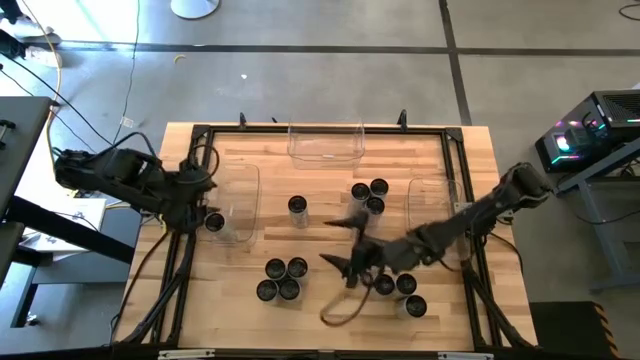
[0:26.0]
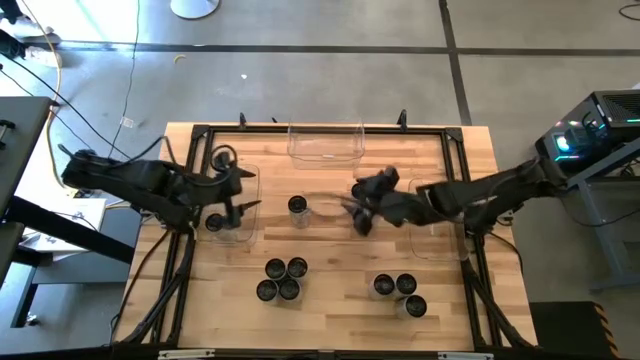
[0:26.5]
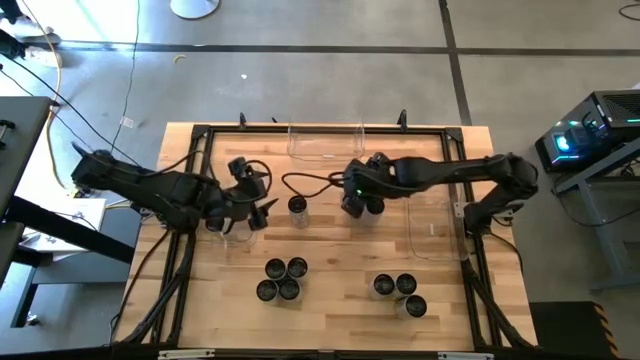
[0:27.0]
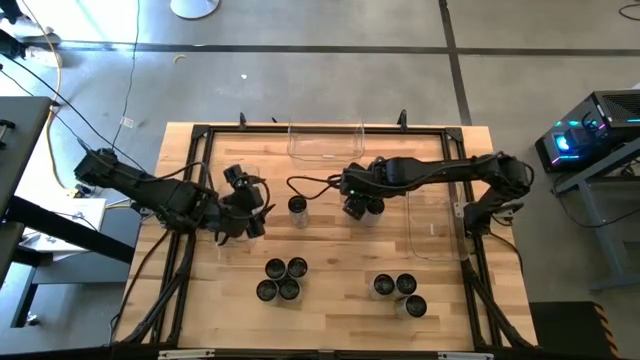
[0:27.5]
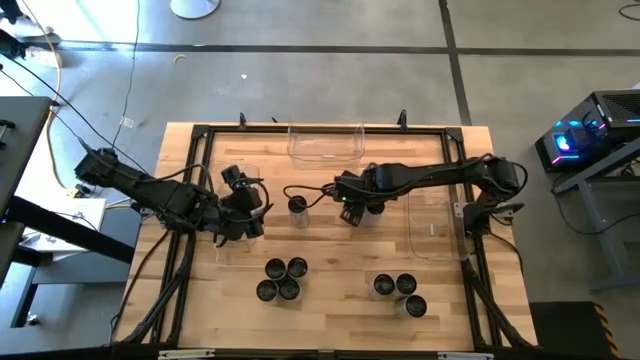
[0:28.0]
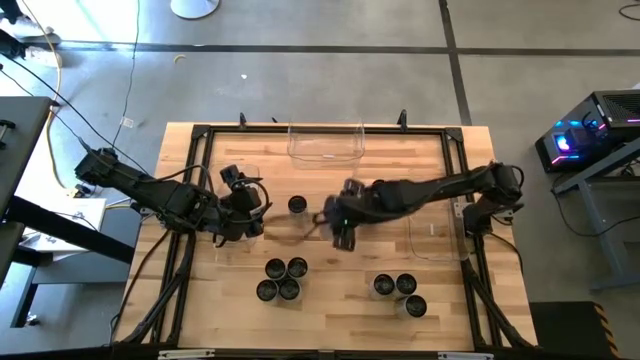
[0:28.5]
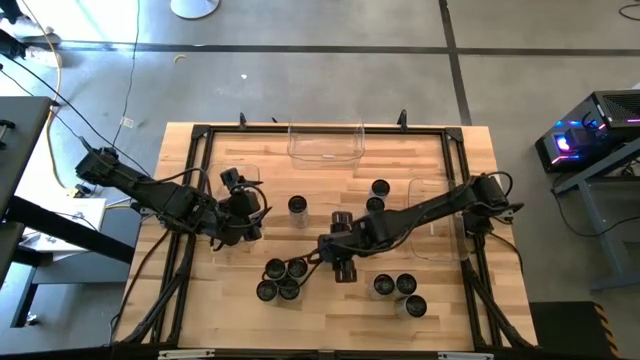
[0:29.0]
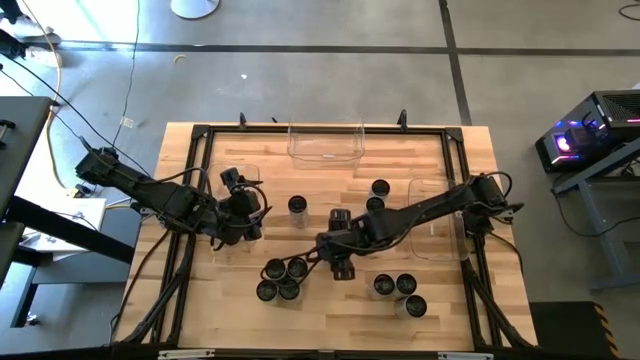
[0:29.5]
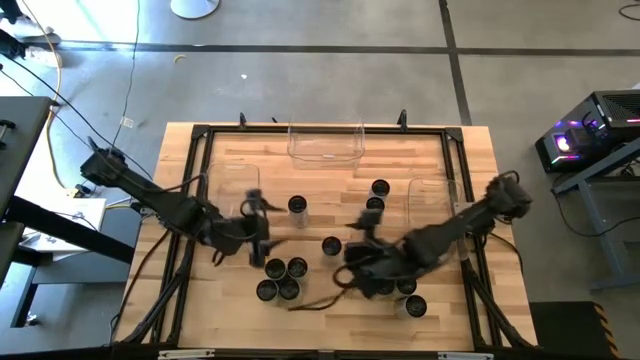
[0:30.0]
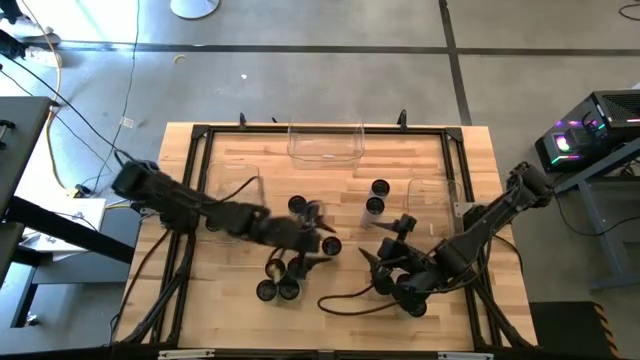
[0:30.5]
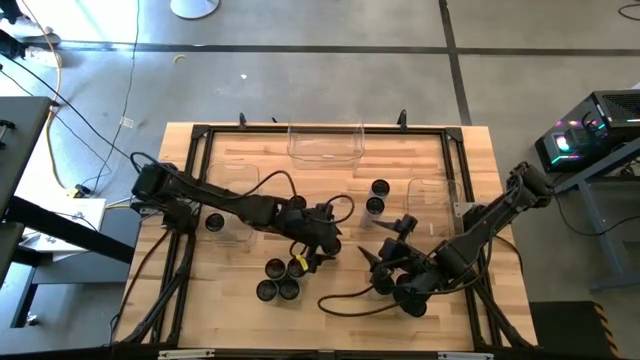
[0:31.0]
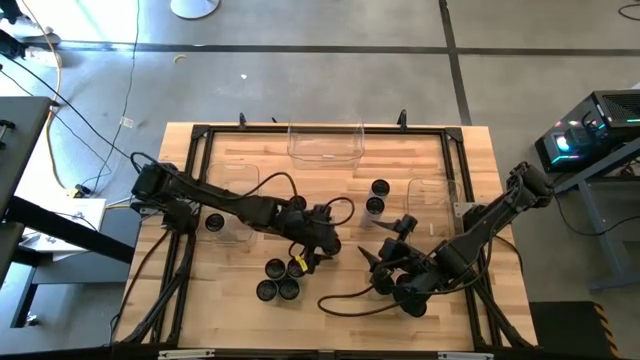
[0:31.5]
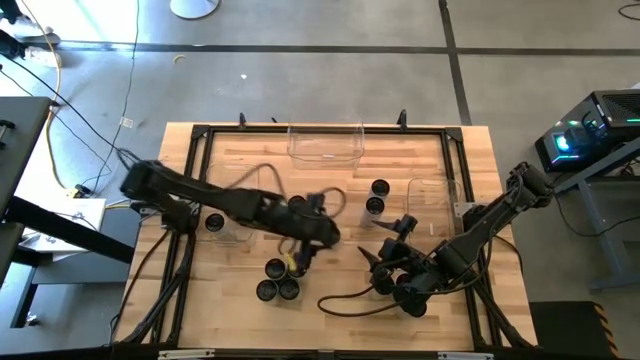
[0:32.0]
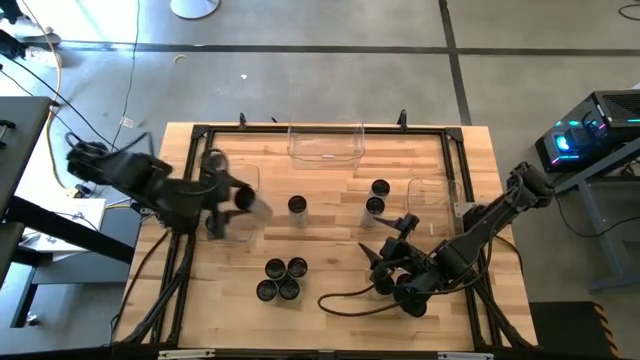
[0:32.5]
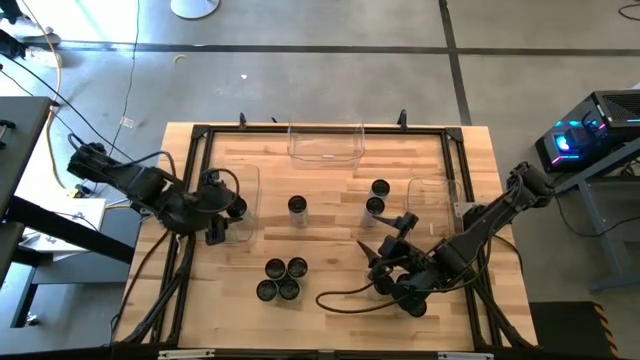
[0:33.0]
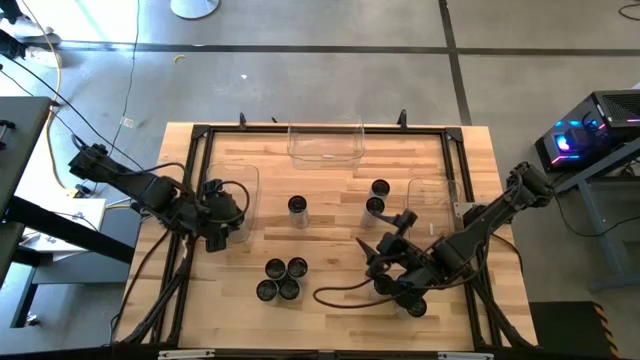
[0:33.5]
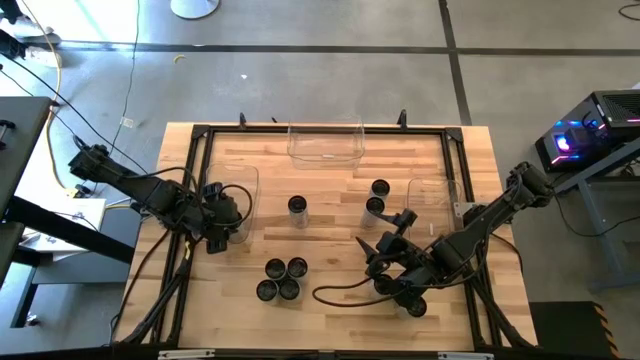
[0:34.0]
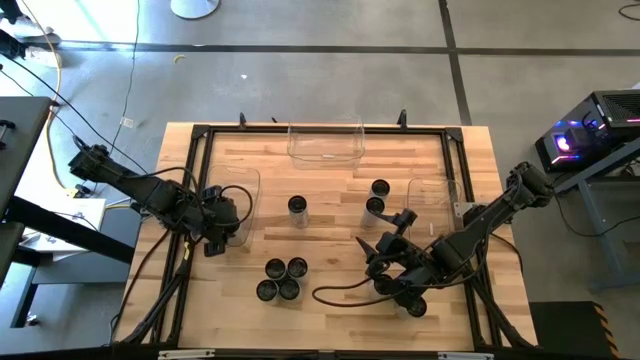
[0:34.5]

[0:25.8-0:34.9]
Task: Sort soda cans
Put the white-yellow soda can into the left transparent bin

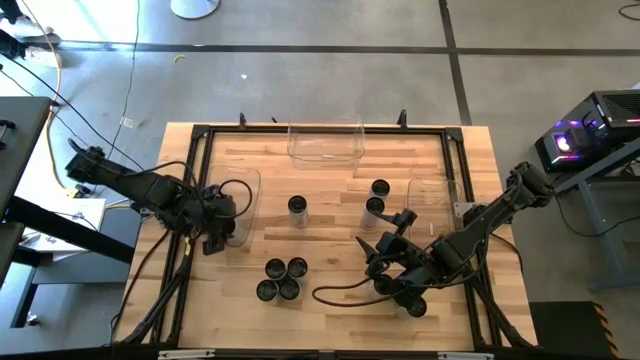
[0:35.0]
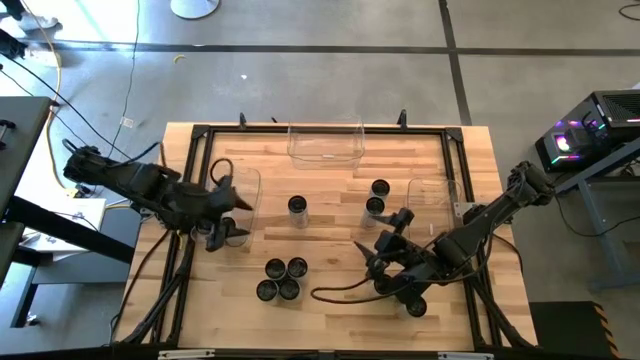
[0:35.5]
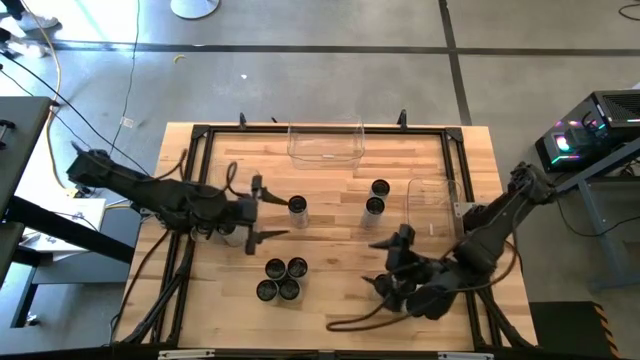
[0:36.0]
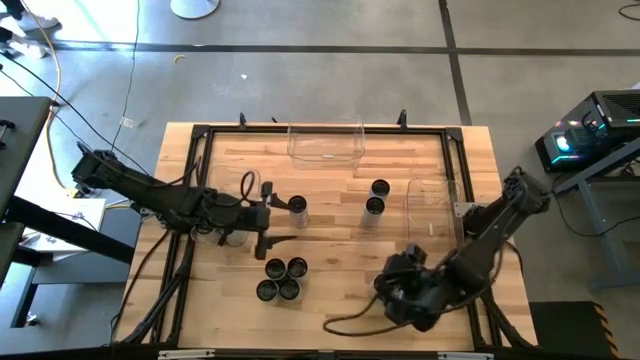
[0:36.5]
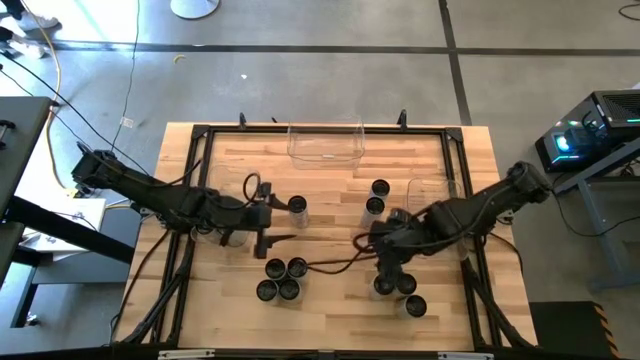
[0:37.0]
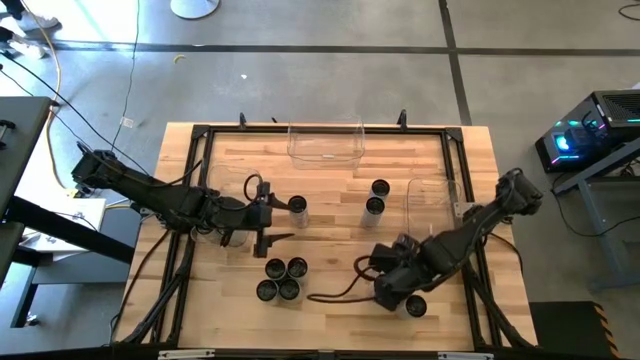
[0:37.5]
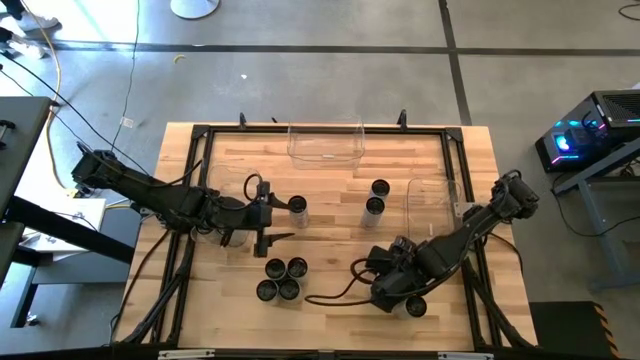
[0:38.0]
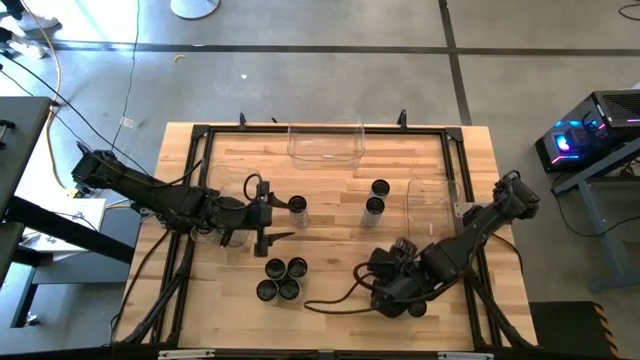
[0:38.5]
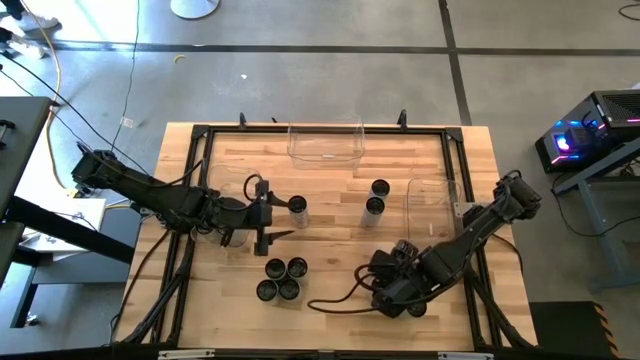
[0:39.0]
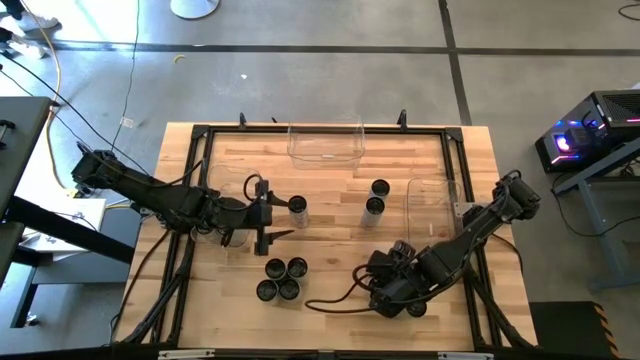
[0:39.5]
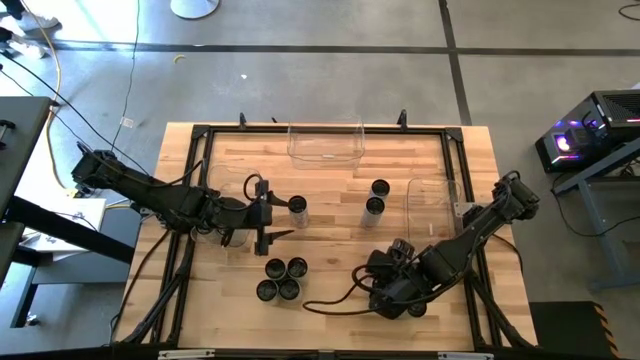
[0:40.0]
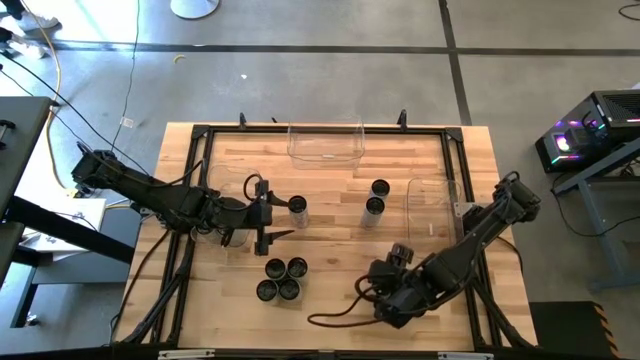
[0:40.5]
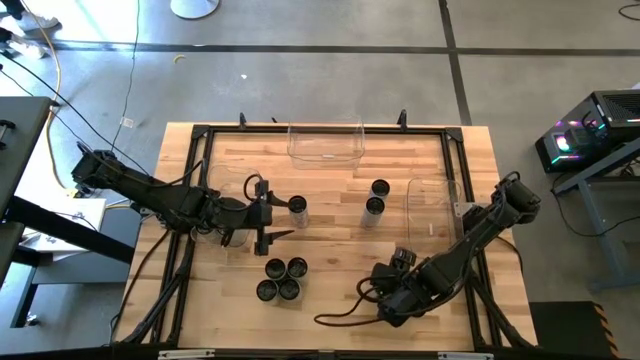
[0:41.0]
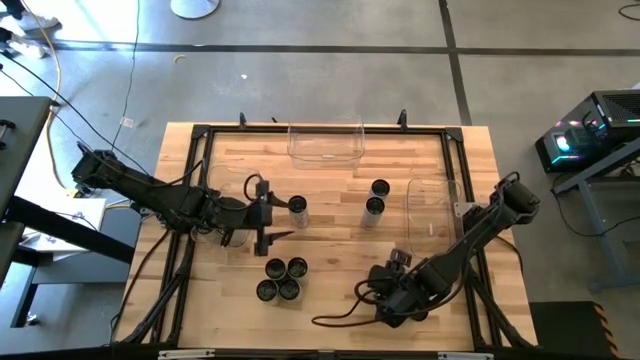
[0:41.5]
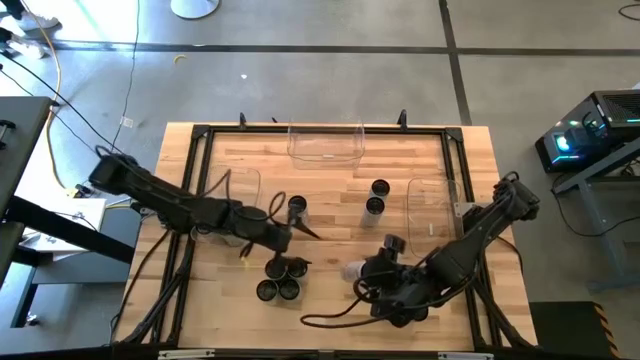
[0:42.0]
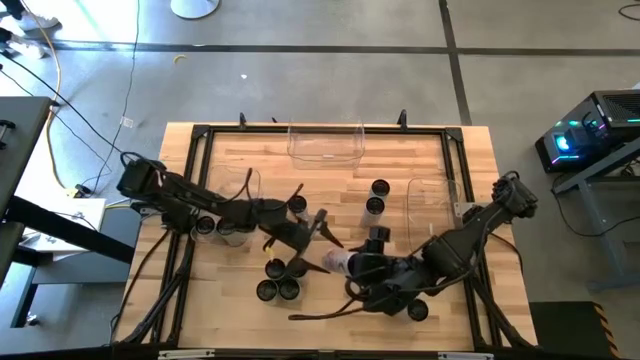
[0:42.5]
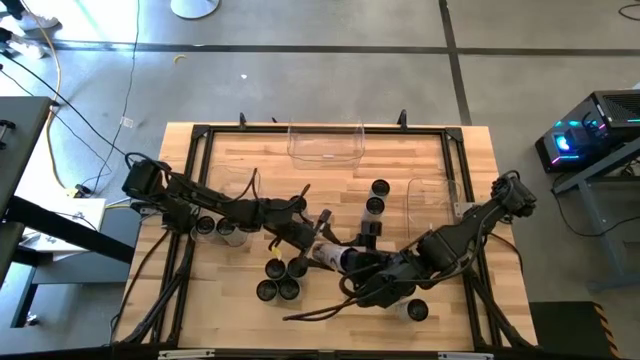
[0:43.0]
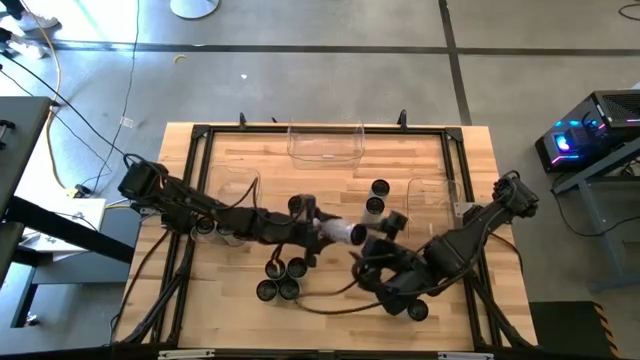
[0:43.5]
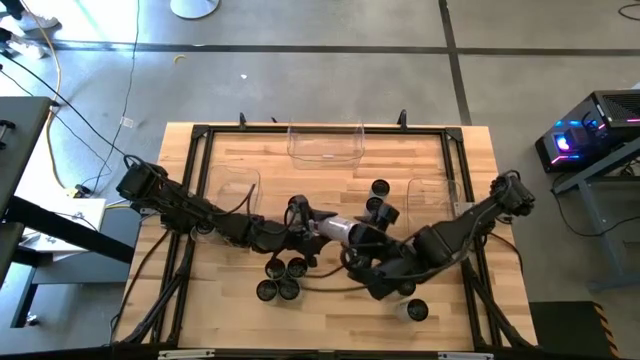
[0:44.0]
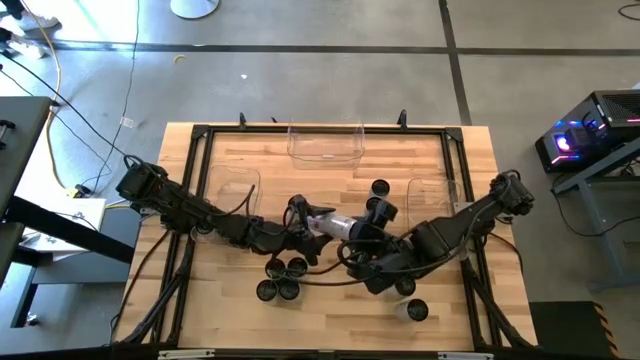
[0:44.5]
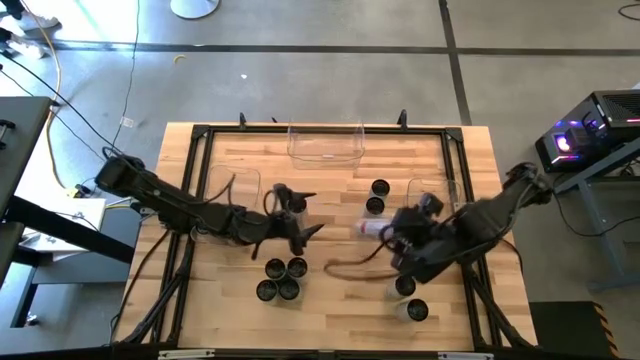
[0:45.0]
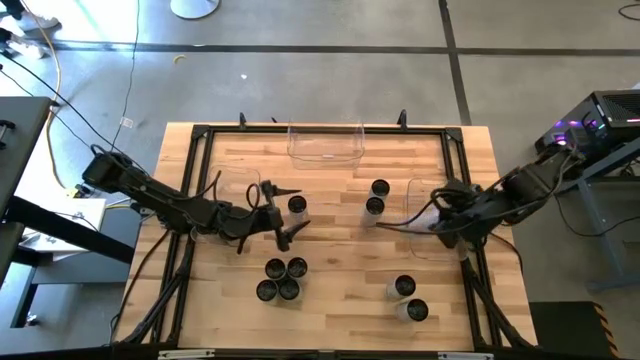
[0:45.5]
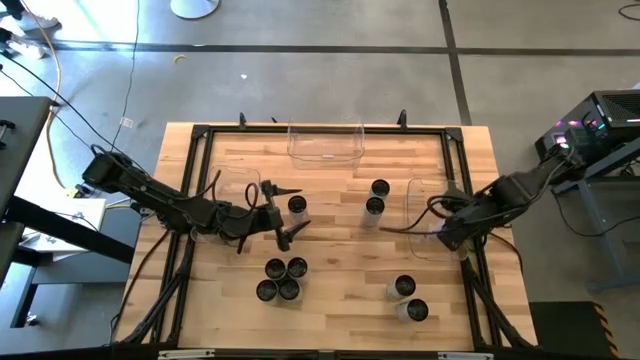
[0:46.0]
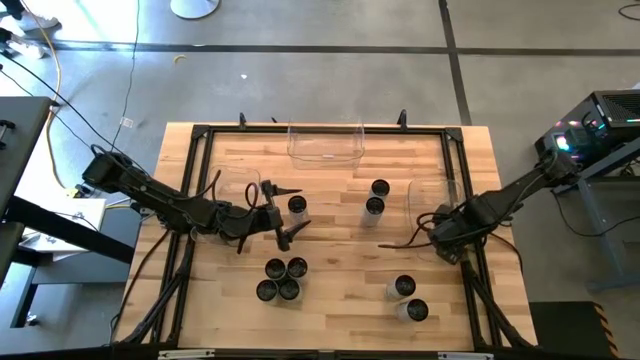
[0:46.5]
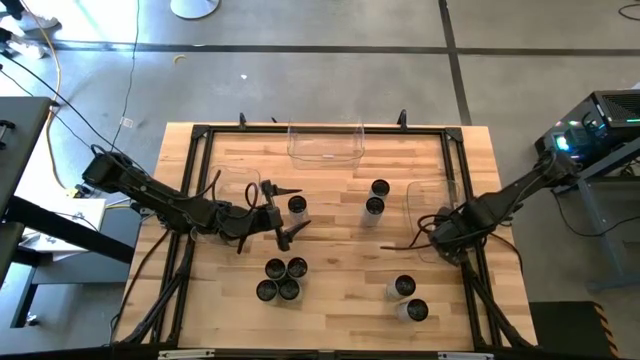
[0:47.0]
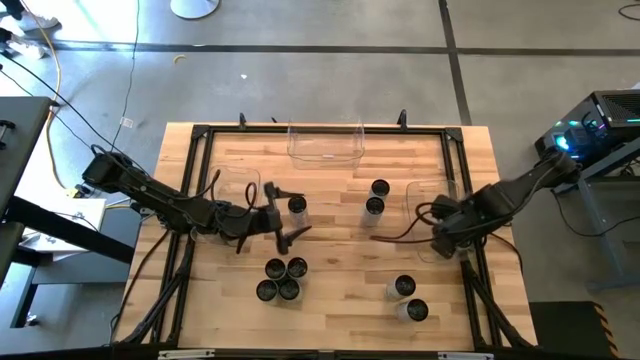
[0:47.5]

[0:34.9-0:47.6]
Put the white-pink soda can into the right transparent bin
